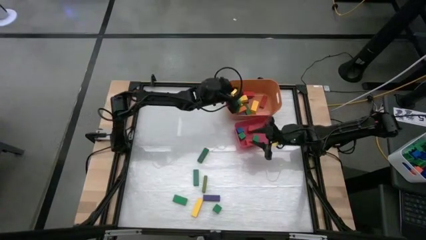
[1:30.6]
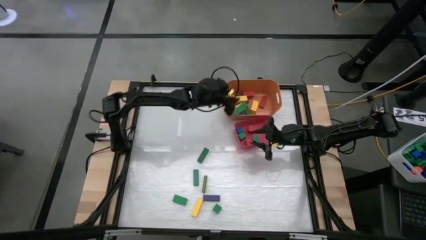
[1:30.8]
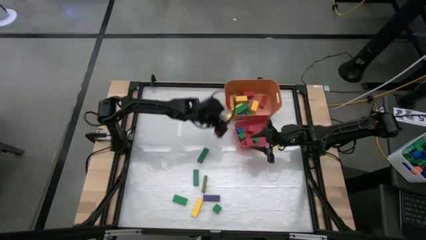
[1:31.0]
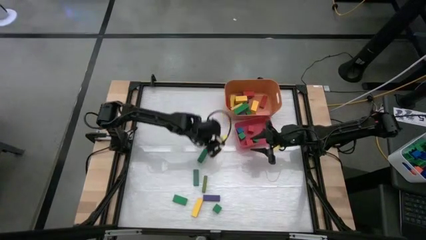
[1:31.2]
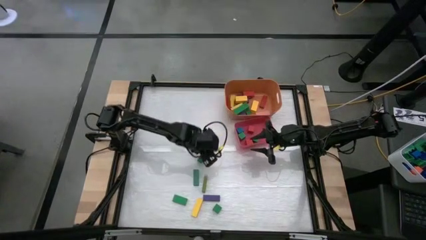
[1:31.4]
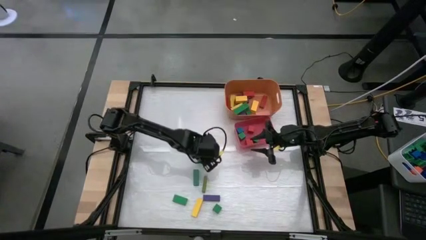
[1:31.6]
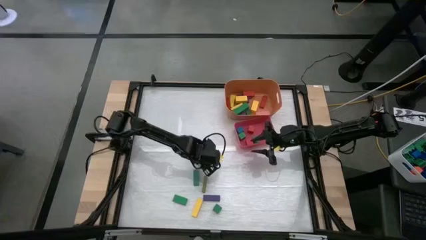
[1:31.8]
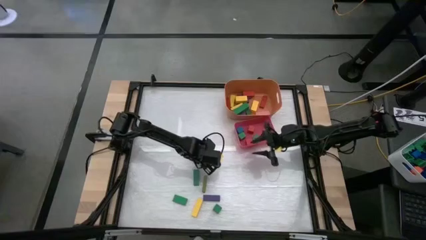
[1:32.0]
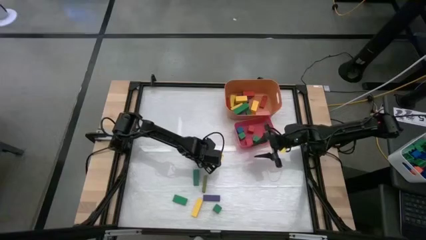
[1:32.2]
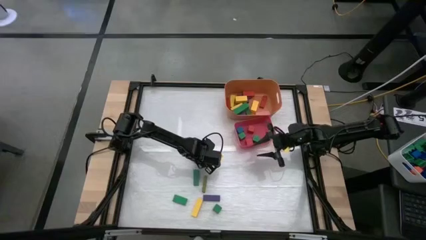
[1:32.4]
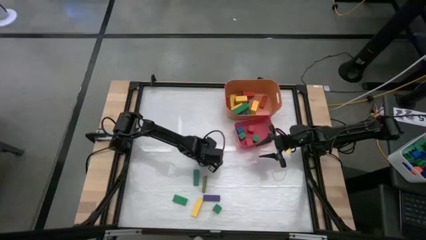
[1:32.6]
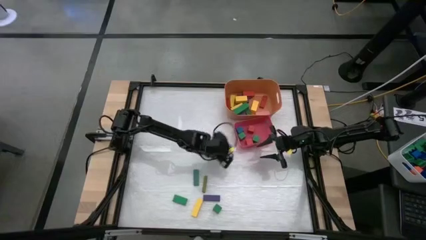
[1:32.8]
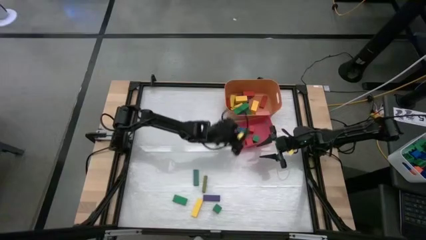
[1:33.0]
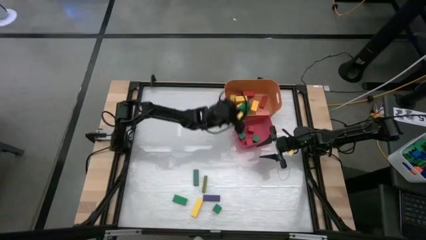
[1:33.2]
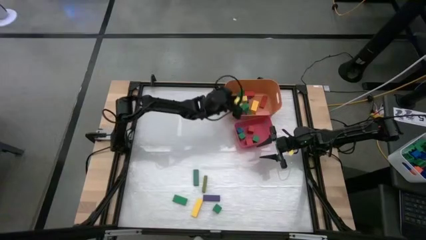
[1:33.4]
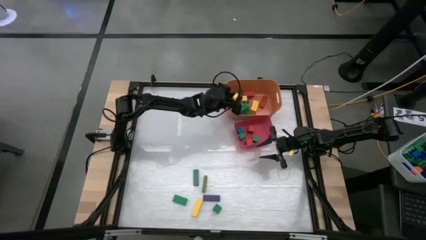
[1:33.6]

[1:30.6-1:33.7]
Task: Sort blocks by size
Put the green rectangle block into the orange bin

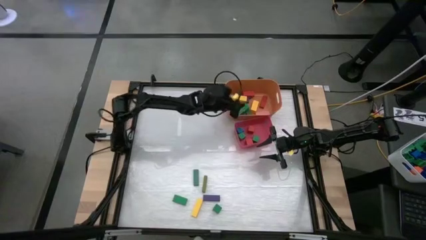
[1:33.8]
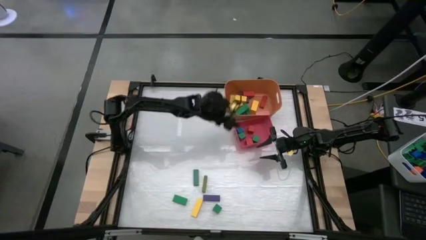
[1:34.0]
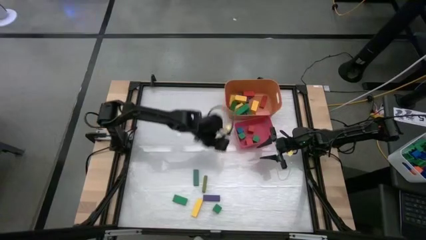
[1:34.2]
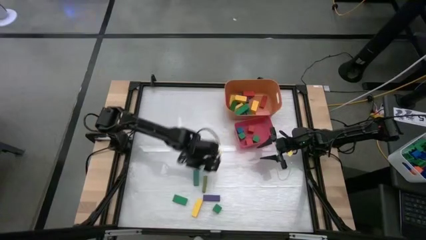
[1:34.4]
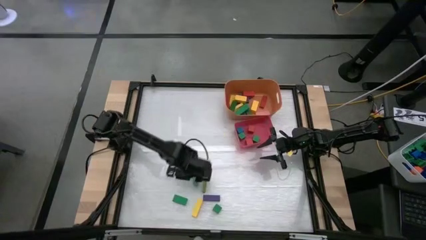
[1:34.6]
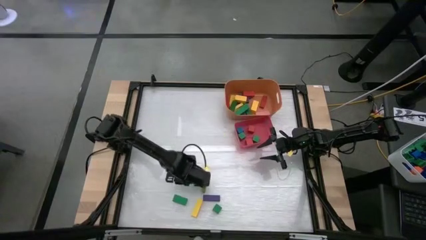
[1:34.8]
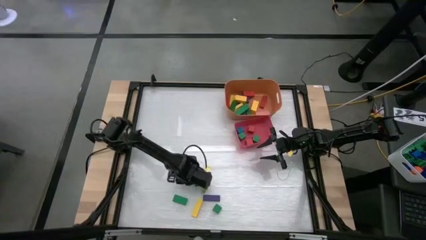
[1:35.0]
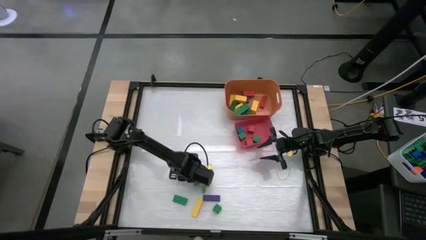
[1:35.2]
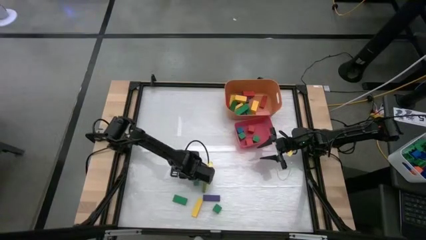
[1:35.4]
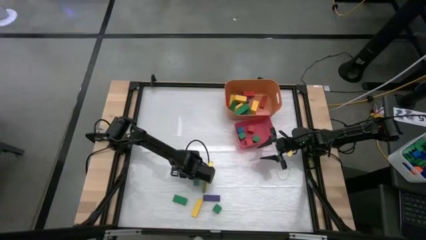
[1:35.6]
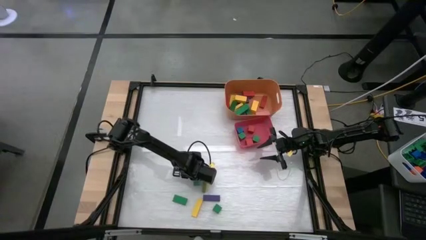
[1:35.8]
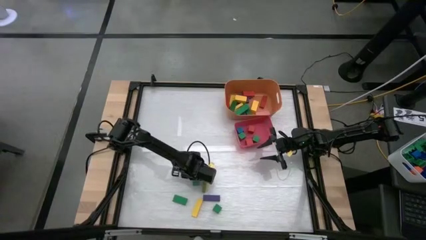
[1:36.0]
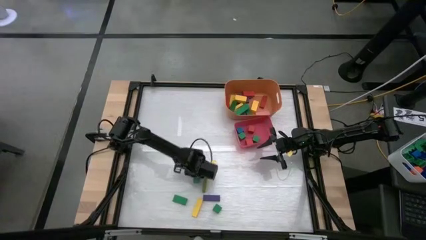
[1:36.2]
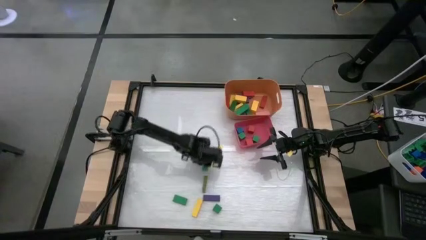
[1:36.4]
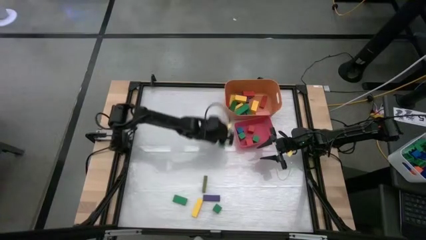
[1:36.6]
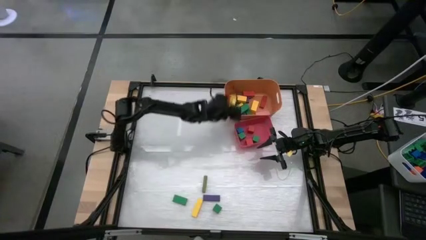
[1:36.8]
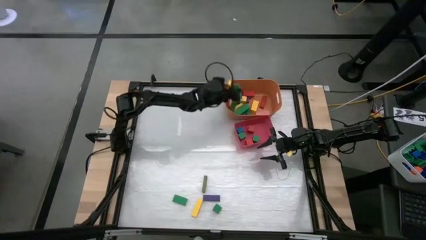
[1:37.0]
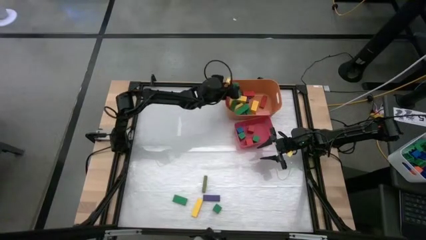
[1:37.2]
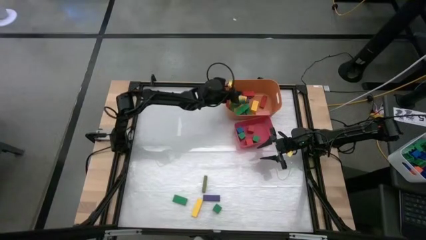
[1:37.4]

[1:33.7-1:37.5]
Put the green rectangle block into the orange bin

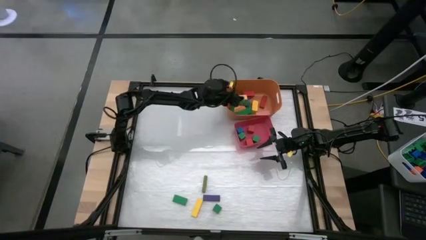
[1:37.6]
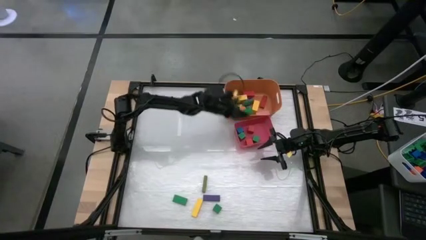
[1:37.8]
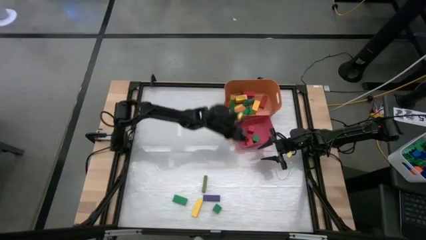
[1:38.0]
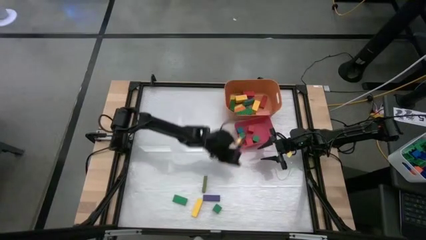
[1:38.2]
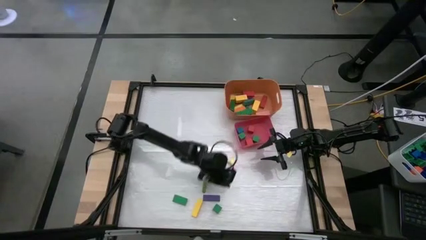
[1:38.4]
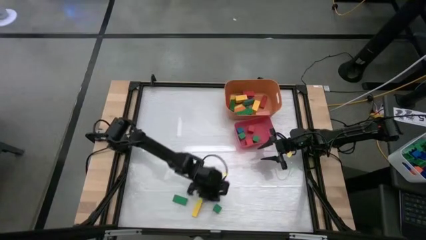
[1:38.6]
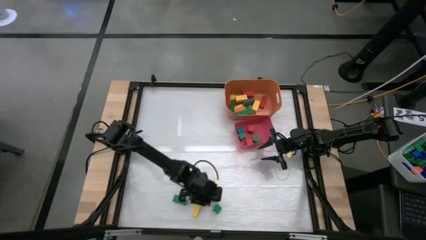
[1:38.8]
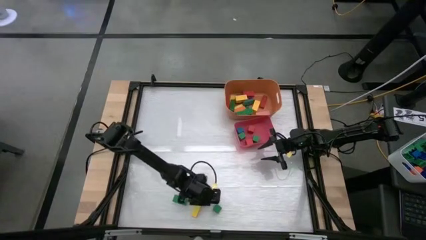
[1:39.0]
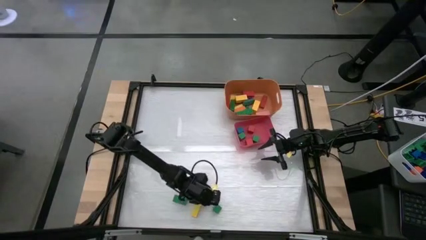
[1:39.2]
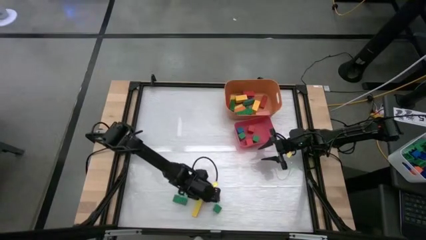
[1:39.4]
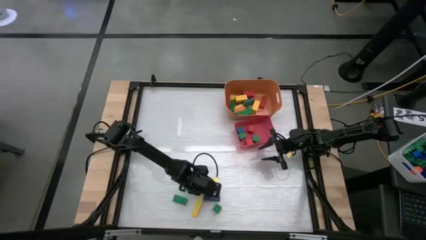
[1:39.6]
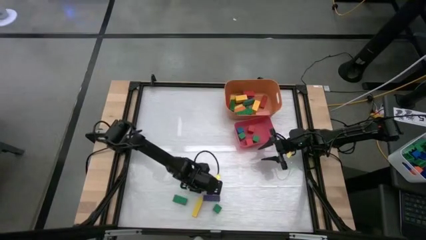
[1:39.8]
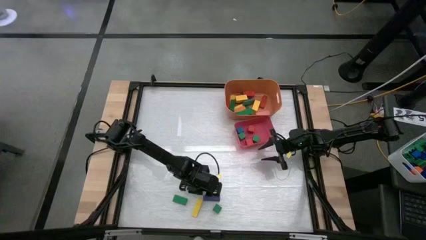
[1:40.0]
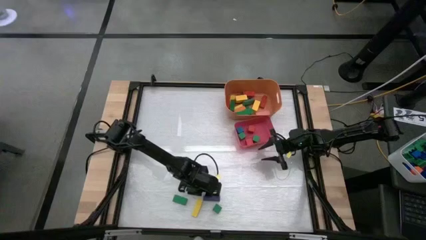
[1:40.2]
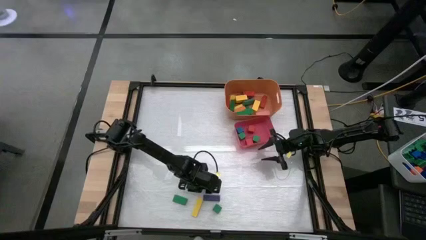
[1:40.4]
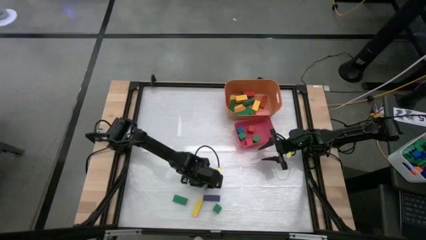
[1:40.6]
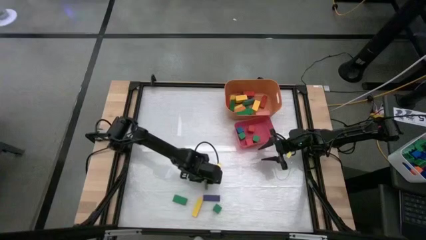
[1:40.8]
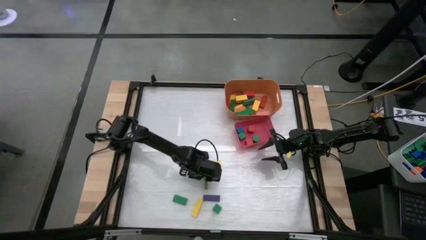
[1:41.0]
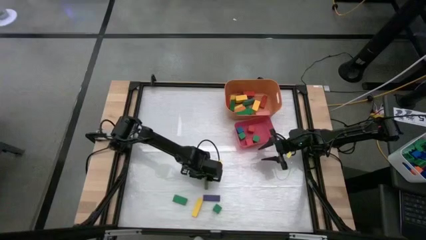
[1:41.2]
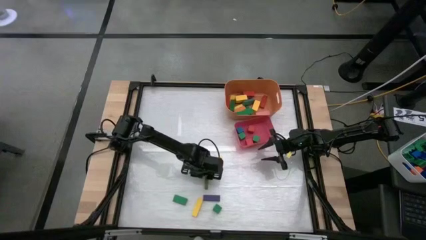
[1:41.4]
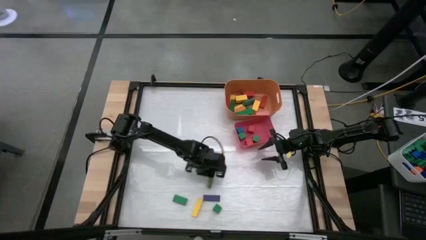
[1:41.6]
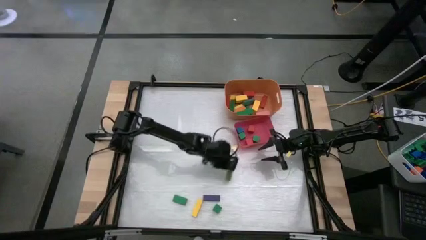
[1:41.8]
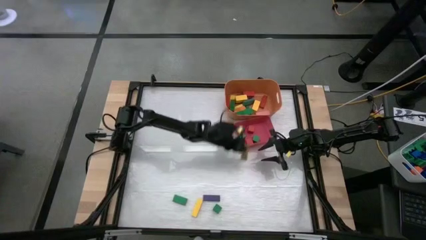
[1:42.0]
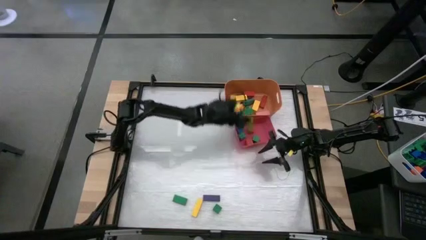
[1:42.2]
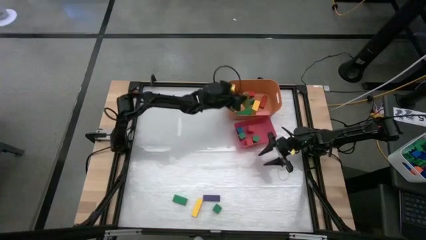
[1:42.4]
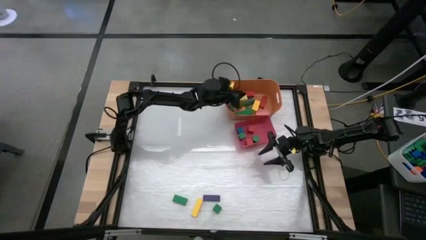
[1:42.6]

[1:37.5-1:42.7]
Put the light green rectangle block into the orange bin

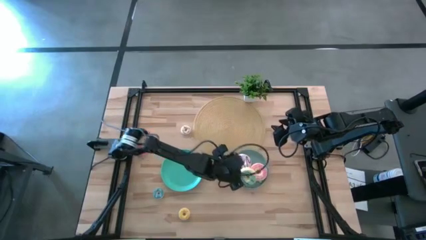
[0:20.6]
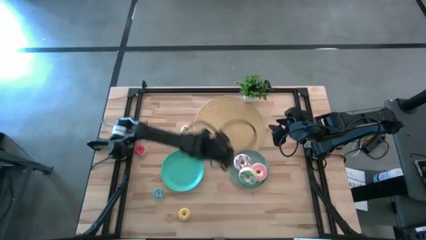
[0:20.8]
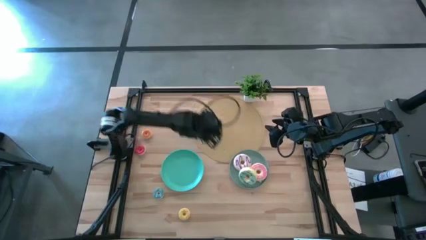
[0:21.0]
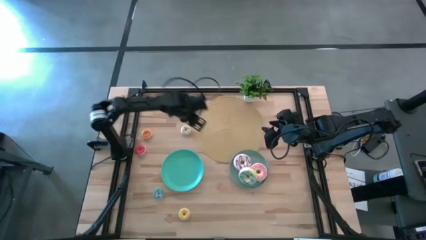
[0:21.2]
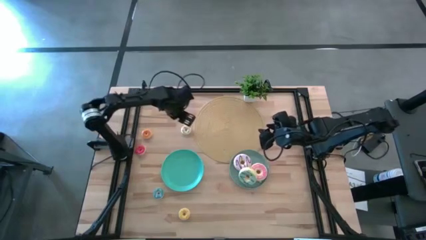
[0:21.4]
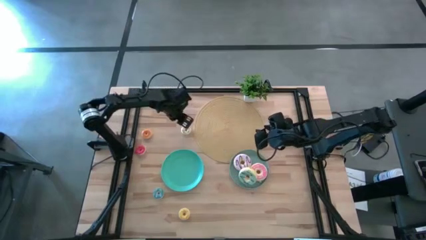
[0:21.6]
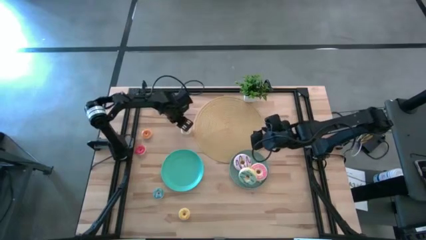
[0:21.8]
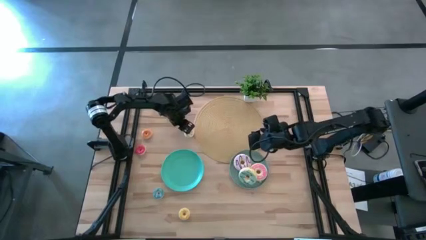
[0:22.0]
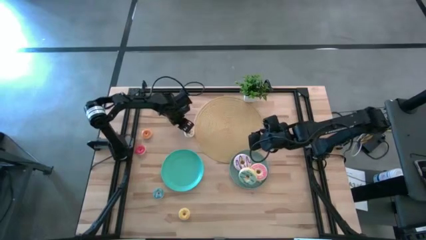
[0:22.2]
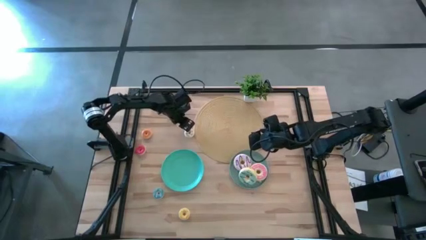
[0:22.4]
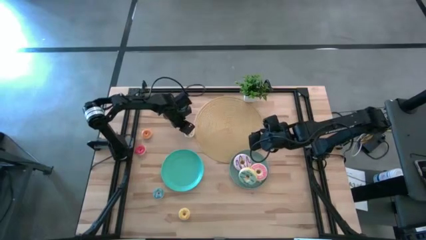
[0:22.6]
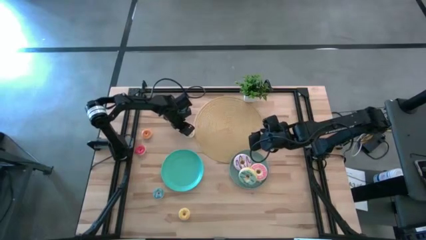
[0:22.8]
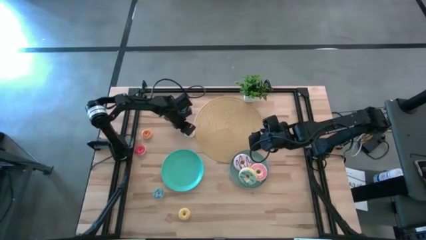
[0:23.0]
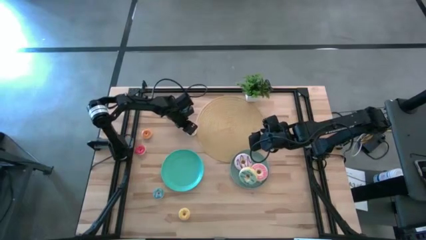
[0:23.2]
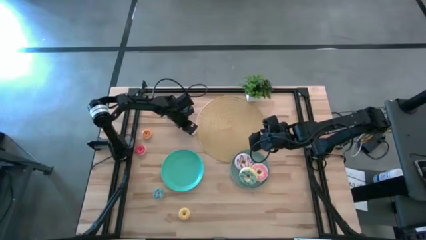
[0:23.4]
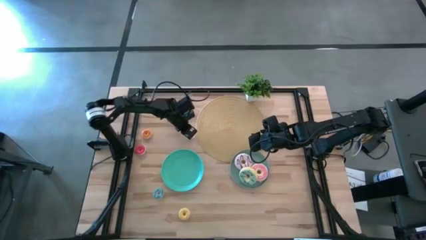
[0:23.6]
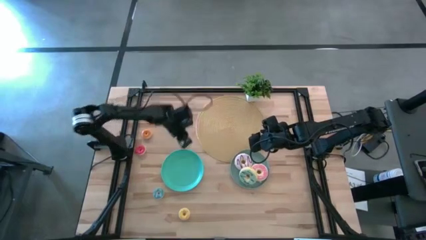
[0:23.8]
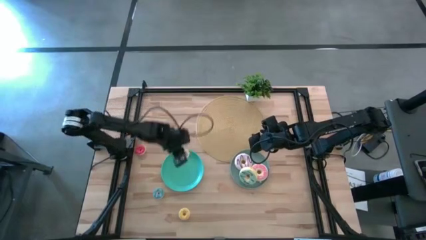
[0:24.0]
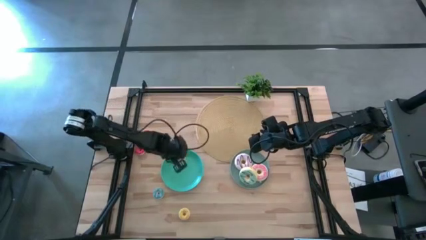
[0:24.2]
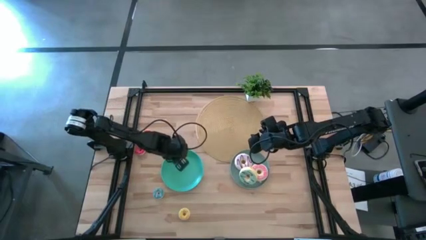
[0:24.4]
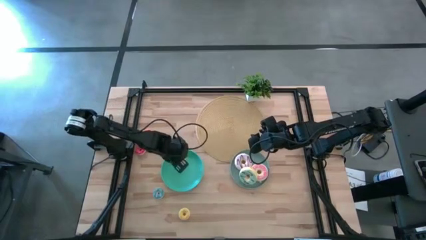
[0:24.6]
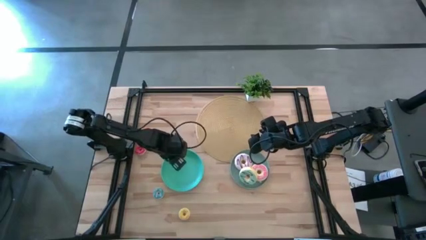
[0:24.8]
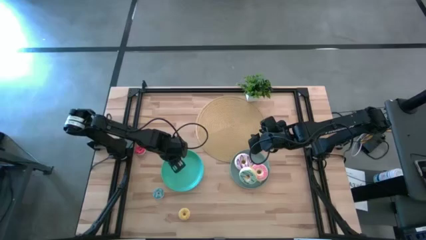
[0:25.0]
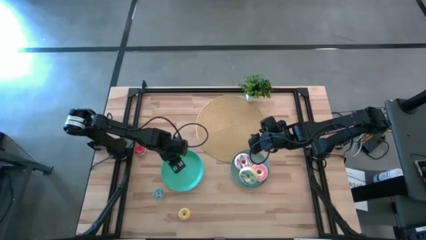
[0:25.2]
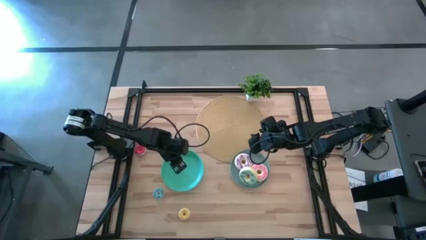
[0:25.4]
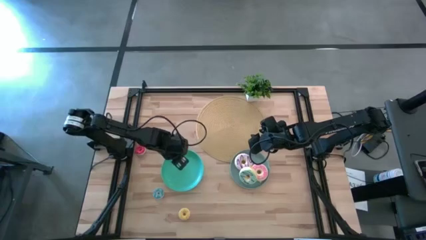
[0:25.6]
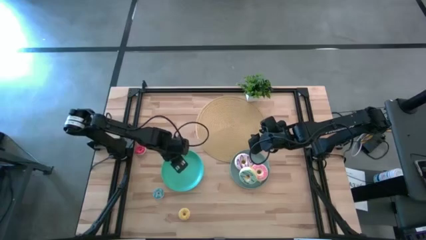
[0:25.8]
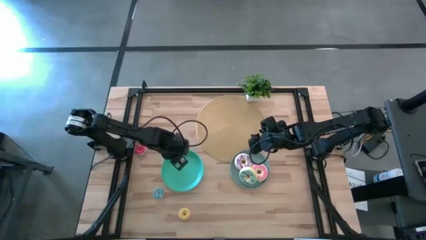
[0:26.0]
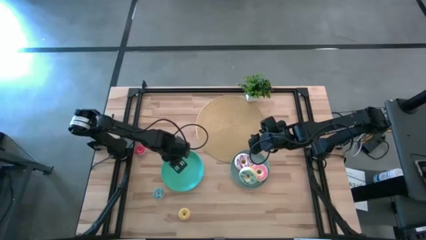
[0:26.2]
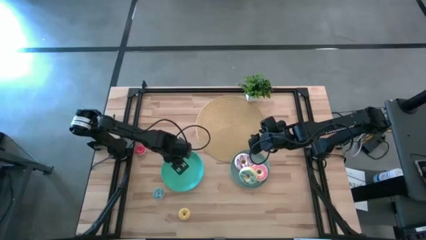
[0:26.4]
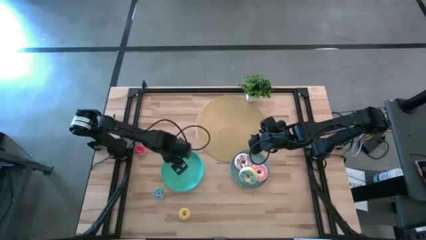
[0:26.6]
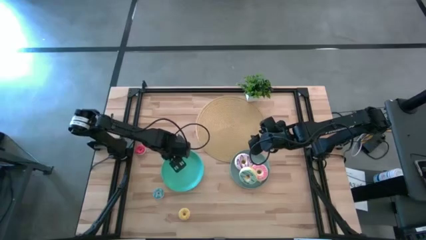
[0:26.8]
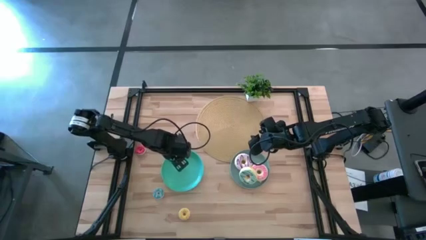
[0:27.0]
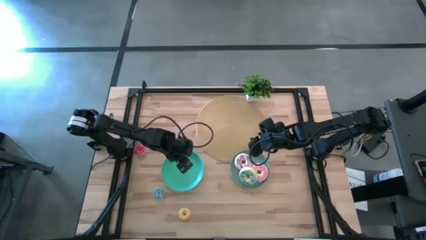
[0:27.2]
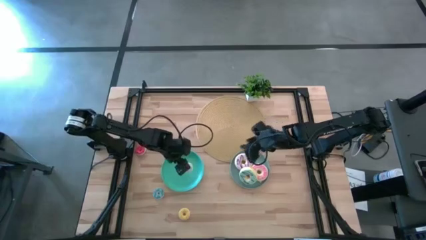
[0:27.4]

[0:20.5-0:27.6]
Task: Pick & Place donuts
Put the small white donut on the blue plate
